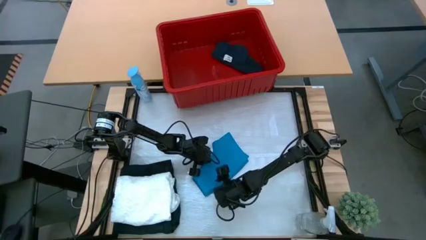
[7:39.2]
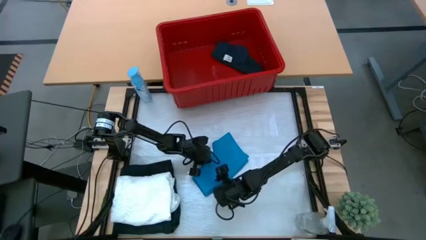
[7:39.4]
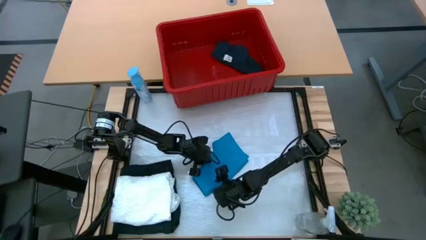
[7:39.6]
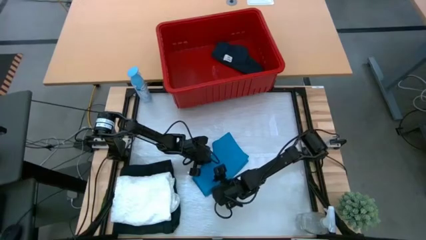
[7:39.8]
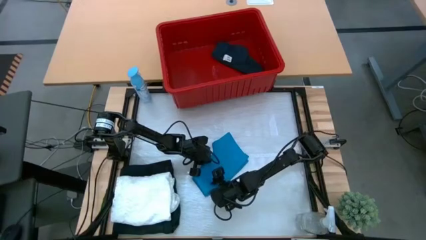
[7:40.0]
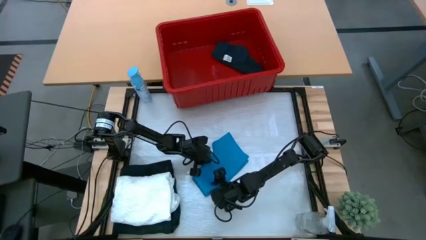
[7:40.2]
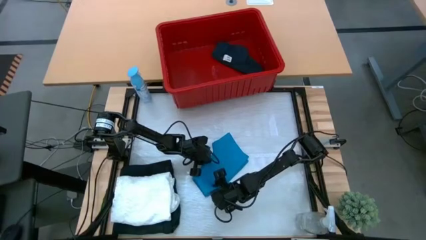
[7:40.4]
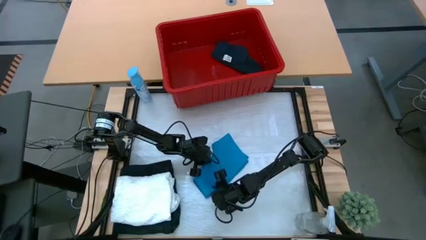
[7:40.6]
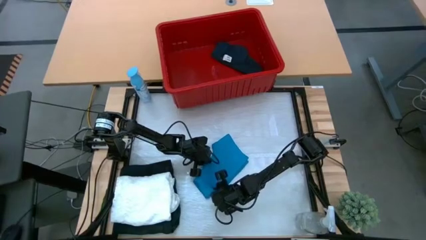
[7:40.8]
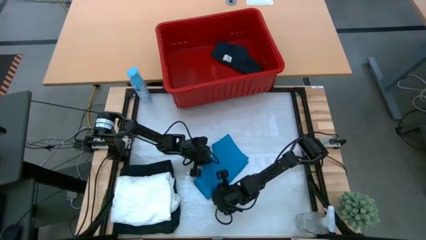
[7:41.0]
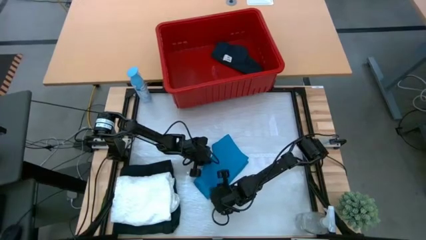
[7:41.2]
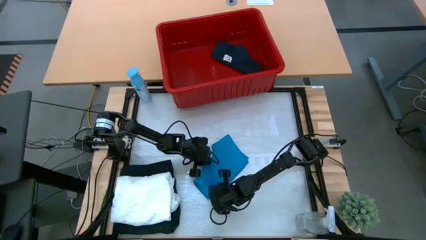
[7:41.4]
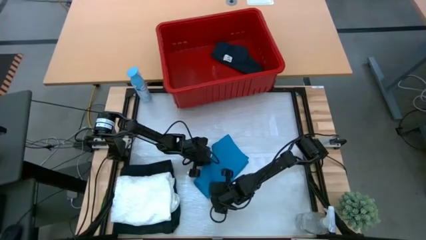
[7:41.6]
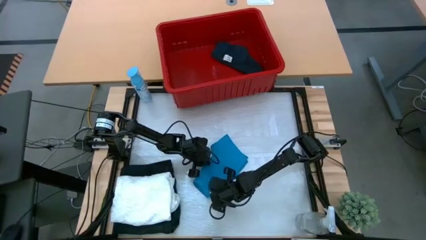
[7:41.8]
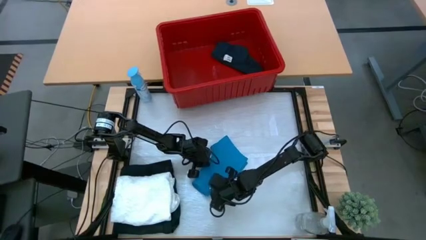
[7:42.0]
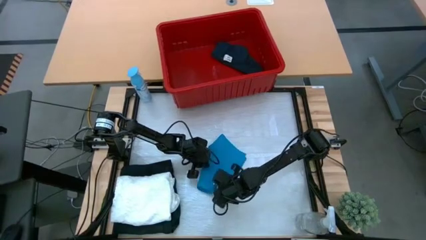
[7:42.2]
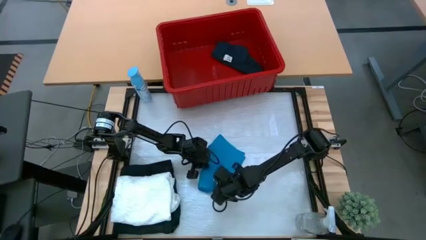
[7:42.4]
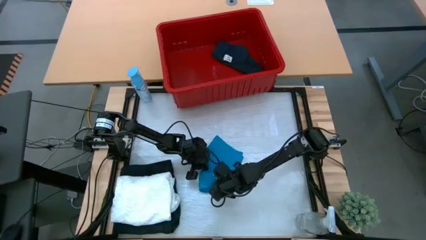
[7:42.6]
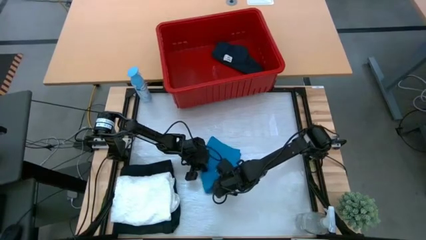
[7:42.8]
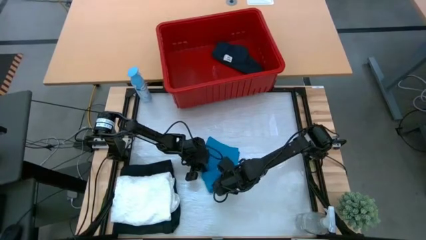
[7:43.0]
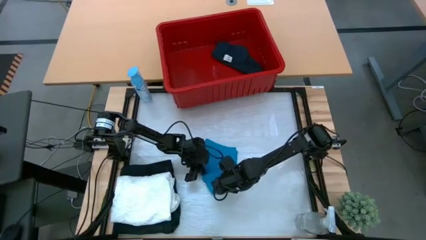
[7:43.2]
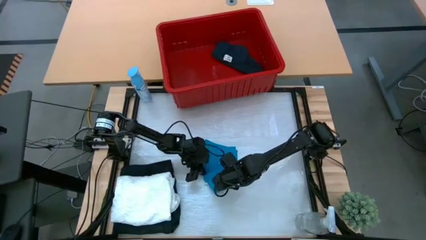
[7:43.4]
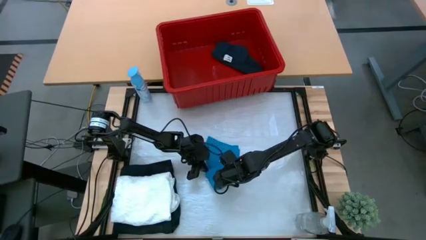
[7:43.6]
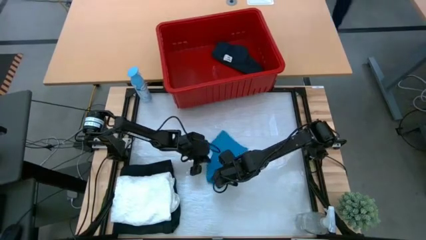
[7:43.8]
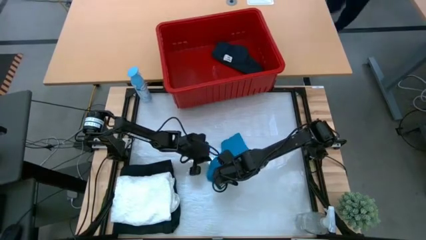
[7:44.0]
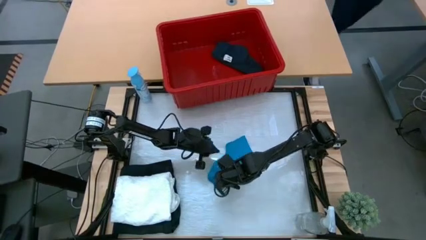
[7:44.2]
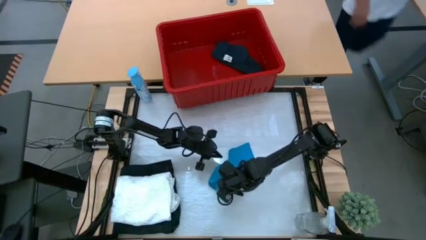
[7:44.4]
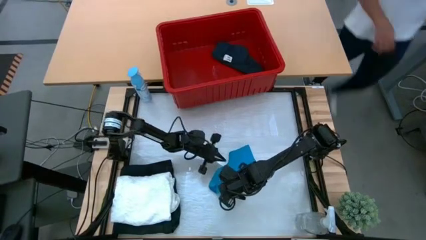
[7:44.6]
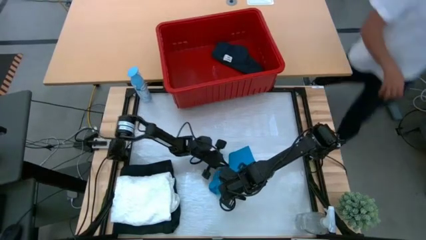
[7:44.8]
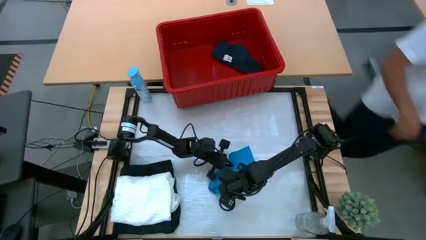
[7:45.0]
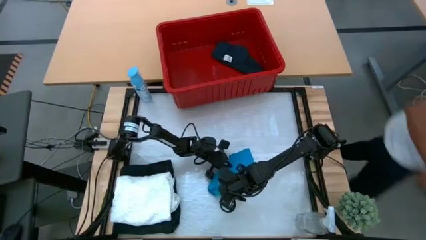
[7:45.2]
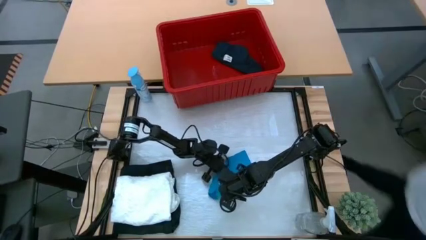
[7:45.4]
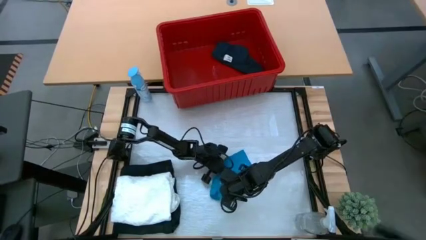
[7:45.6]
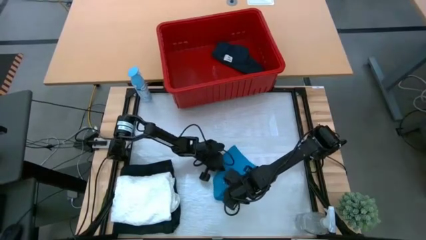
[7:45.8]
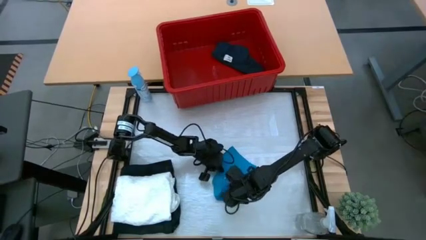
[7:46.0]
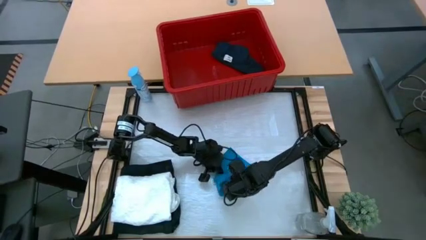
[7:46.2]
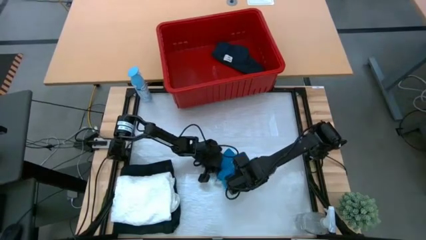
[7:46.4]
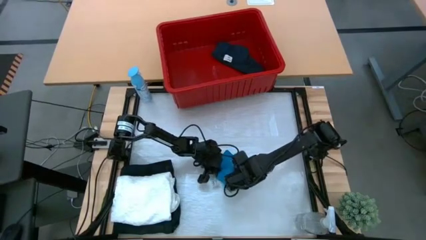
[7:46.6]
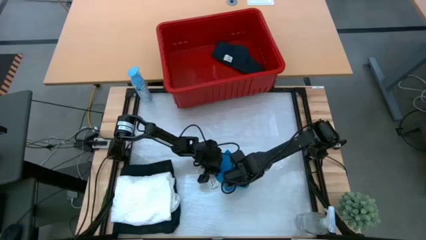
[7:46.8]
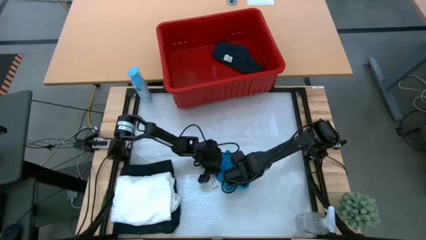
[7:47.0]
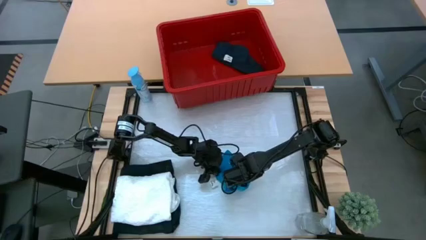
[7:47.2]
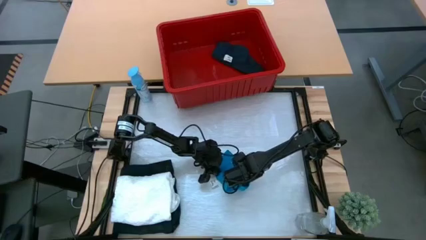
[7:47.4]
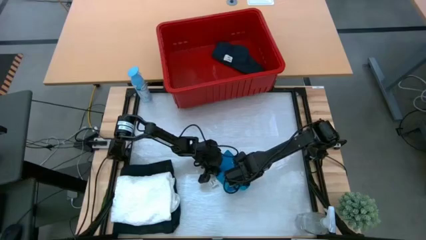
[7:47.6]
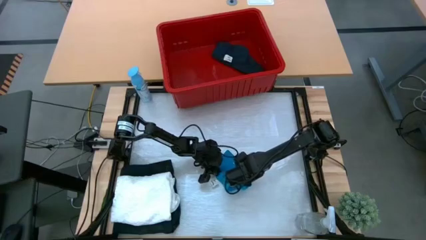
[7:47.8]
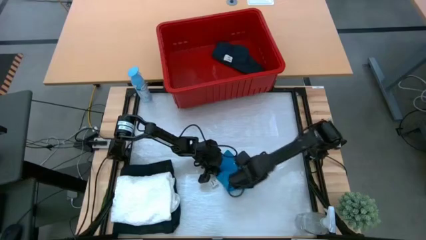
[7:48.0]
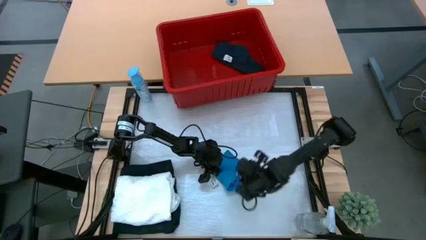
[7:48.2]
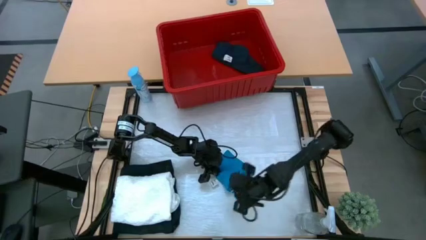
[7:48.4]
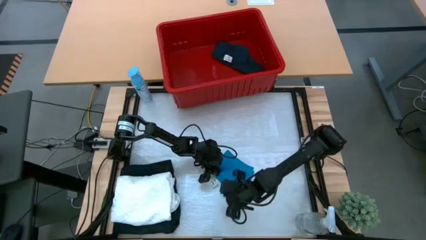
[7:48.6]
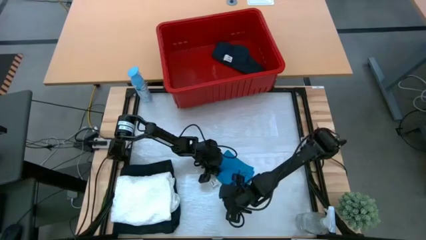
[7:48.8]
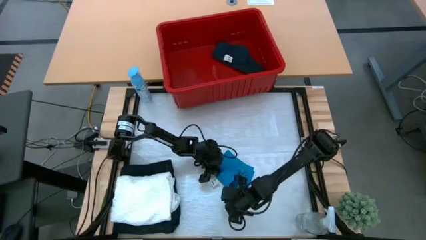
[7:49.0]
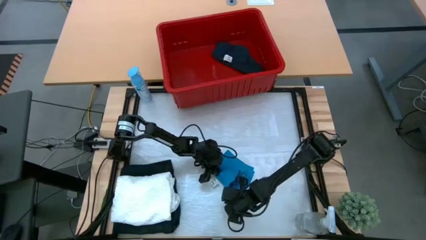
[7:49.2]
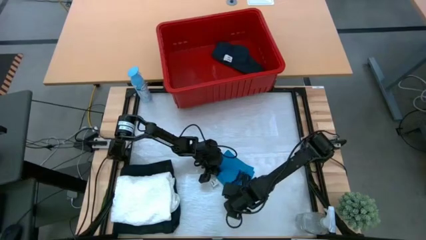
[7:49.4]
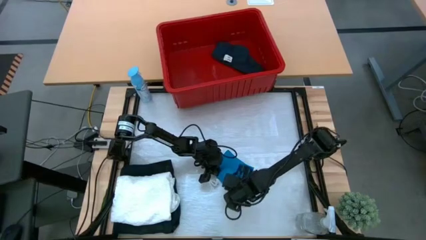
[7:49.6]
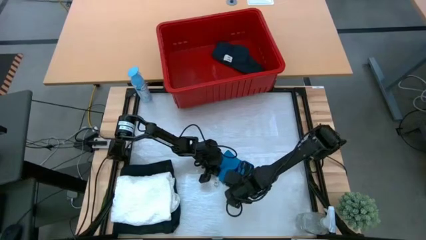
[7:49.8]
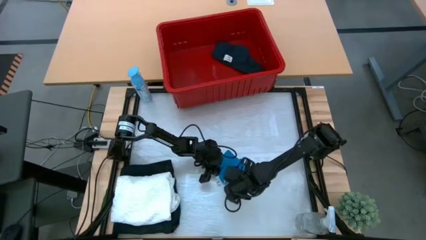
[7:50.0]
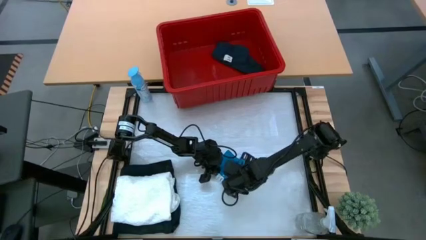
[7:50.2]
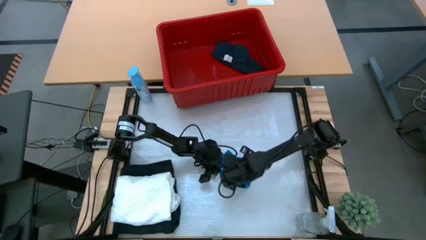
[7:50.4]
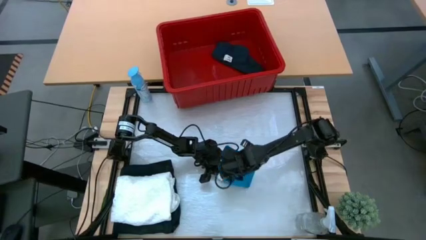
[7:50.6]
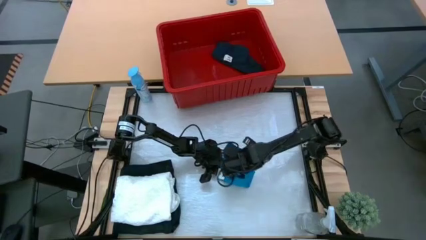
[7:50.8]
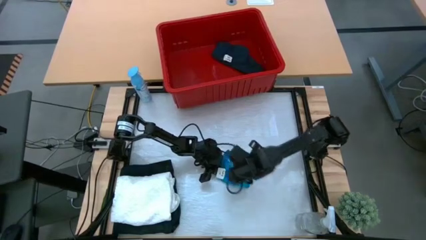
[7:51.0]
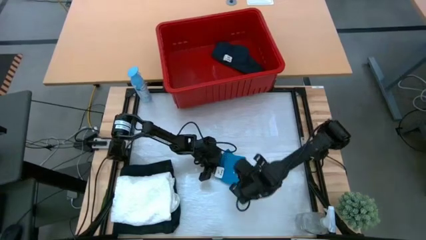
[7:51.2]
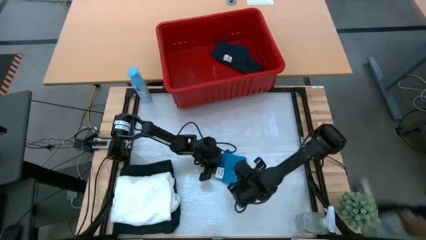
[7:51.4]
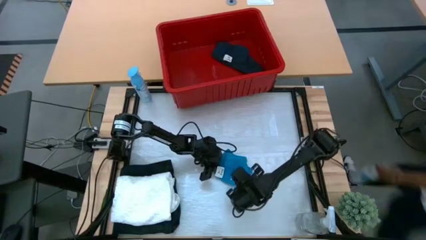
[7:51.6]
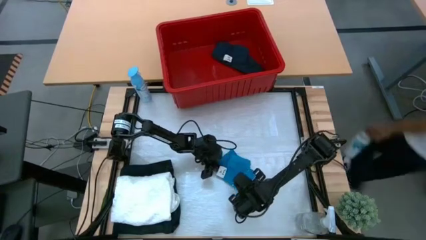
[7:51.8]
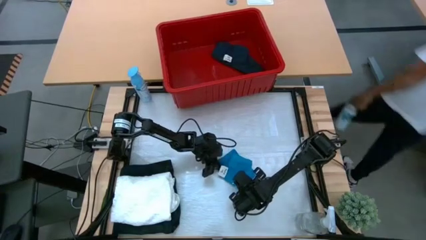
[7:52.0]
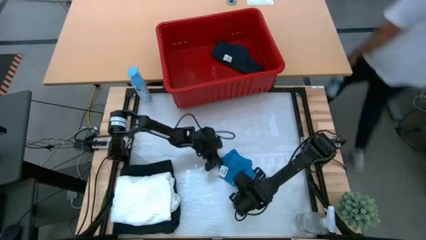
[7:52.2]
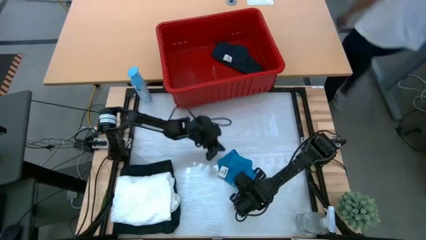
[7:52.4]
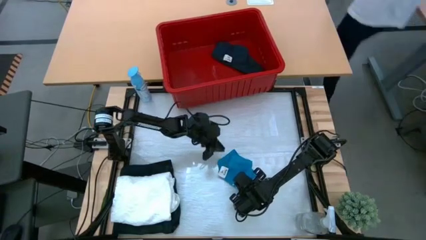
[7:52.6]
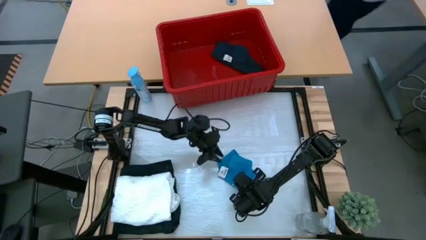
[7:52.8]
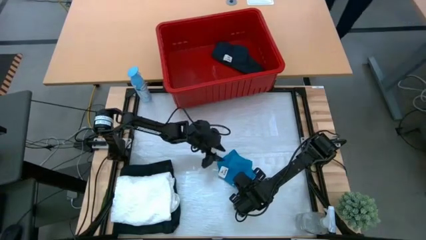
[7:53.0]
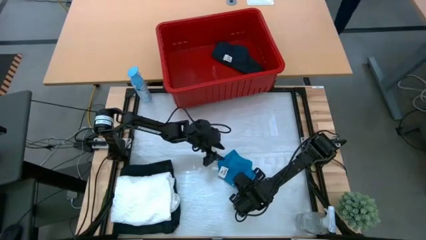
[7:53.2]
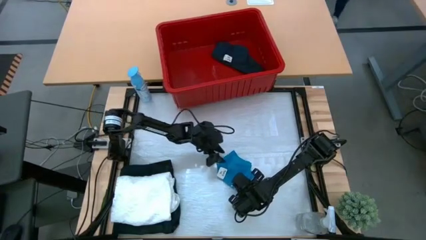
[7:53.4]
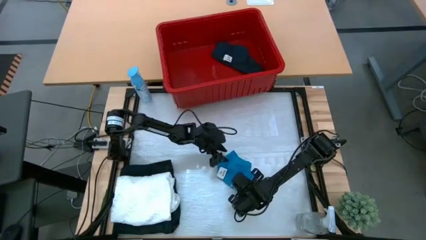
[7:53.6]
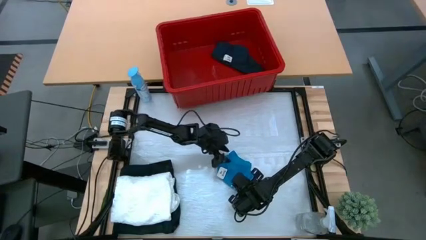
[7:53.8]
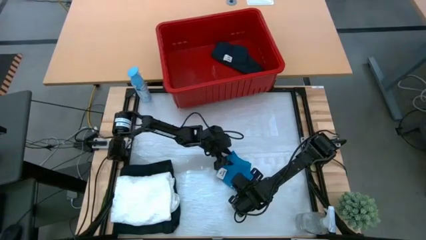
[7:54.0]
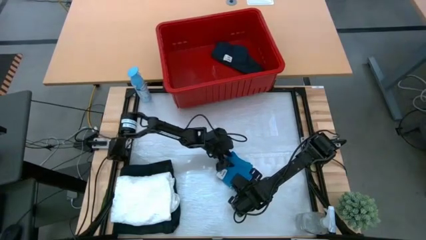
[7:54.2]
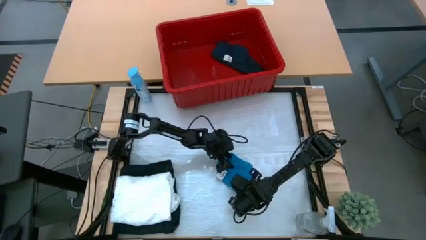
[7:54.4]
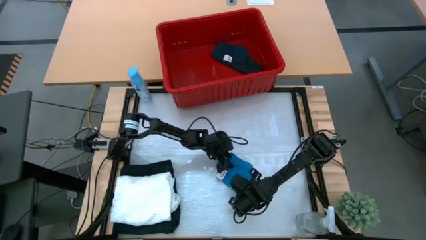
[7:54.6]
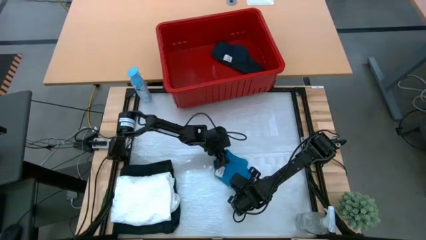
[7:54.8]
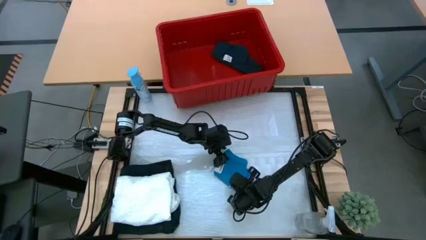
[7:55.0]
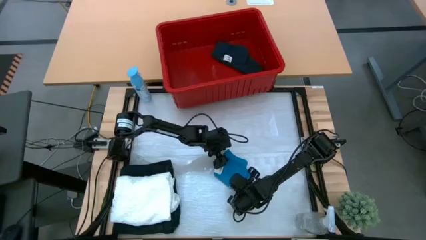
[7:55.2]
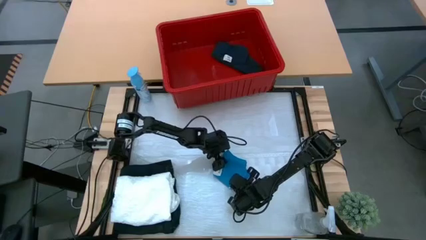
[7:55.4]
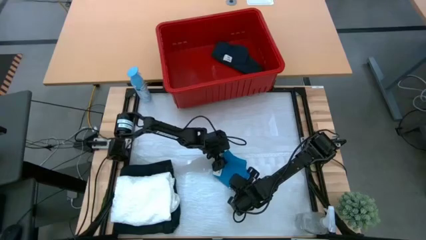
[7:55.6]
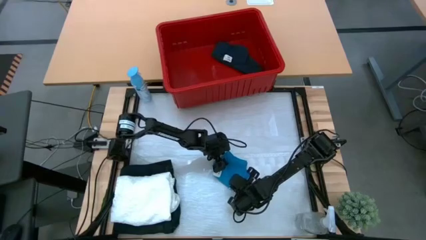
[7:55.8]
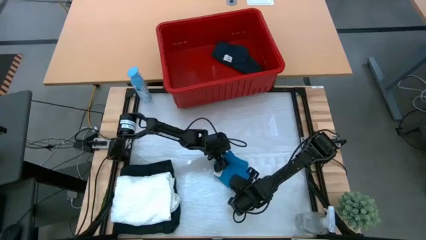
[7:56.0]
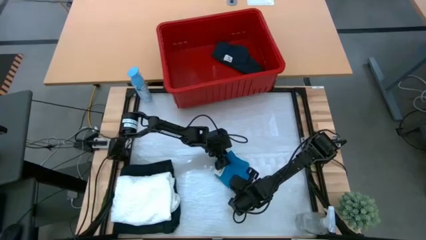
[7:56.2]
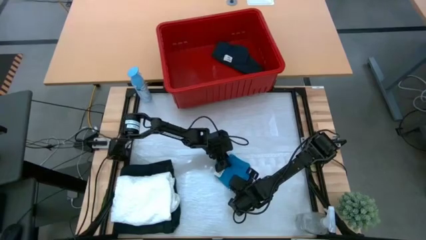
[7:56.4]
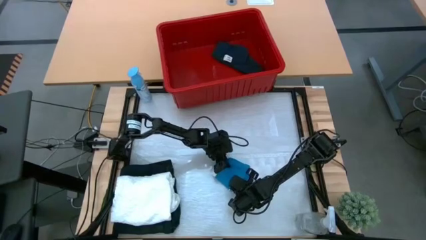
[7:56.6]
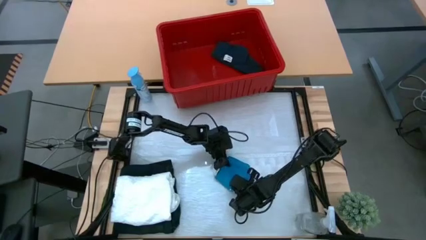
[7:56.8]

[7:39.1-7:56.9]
Task: Fold Laundry from Bin
Fold the blue shorts from the red bin
